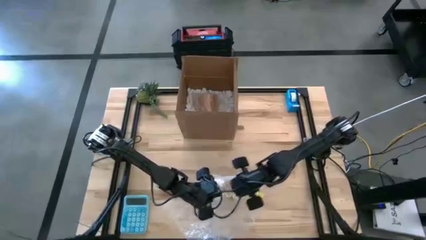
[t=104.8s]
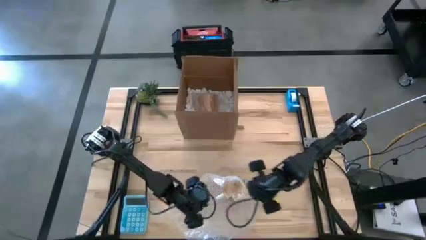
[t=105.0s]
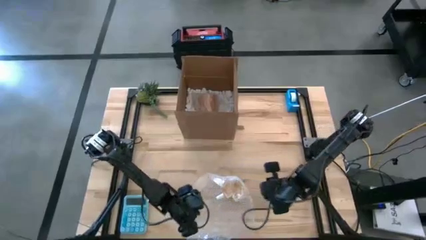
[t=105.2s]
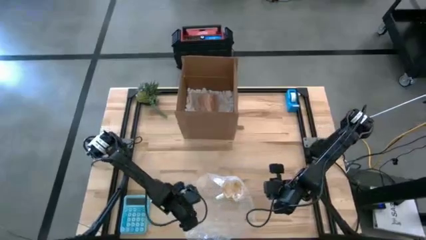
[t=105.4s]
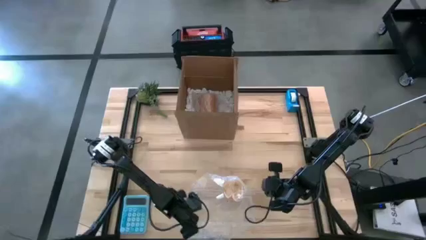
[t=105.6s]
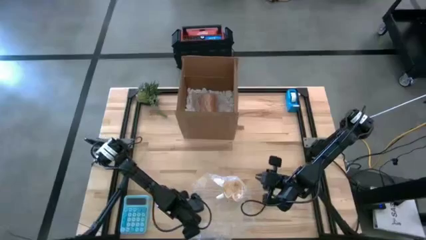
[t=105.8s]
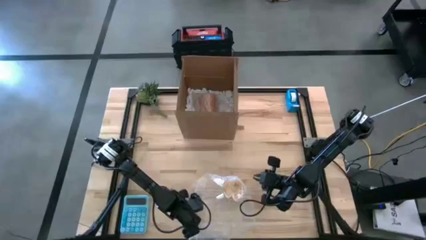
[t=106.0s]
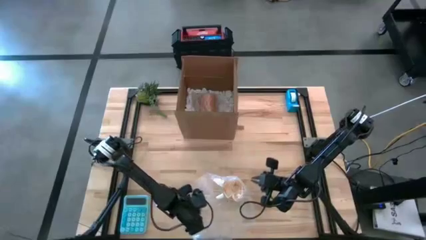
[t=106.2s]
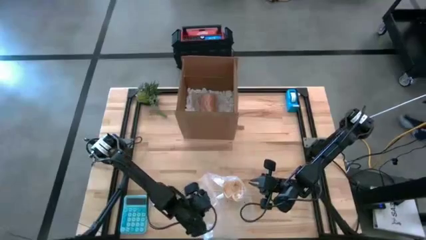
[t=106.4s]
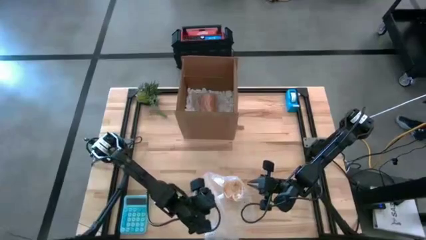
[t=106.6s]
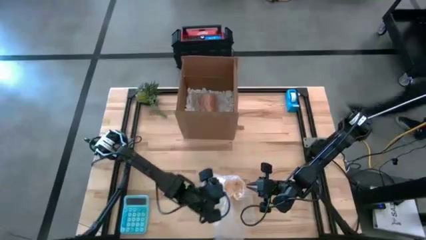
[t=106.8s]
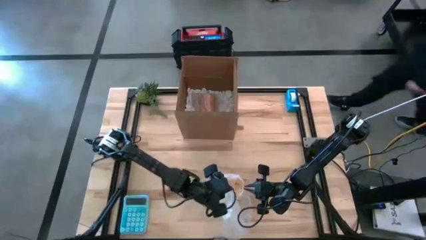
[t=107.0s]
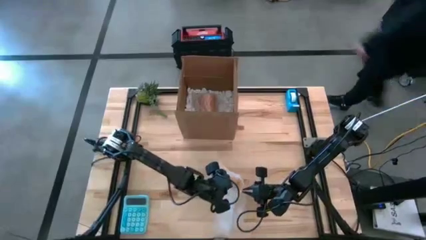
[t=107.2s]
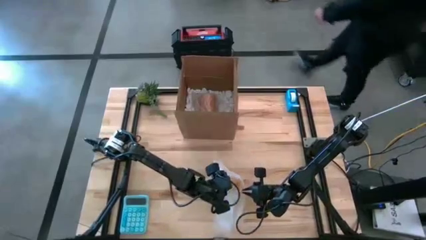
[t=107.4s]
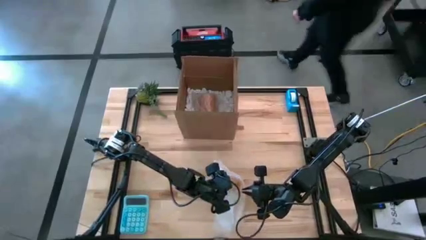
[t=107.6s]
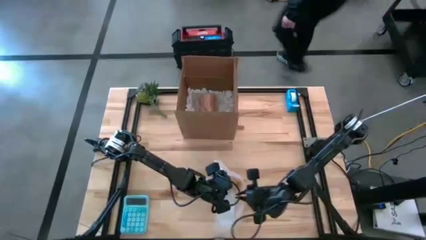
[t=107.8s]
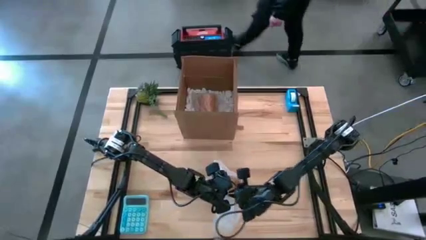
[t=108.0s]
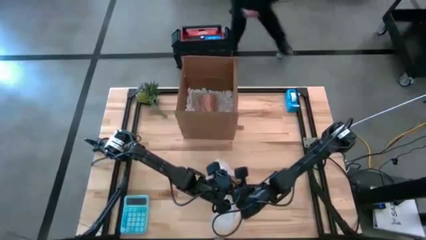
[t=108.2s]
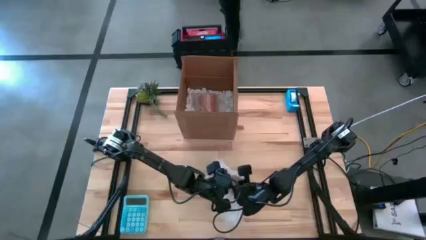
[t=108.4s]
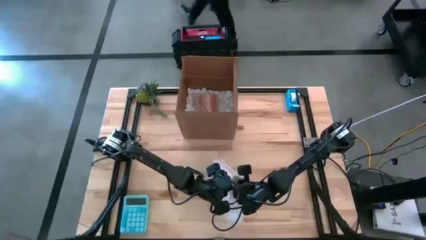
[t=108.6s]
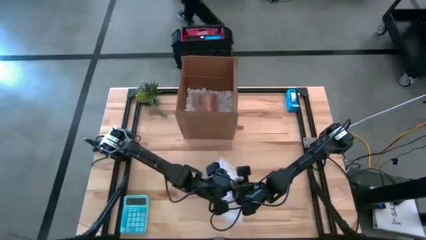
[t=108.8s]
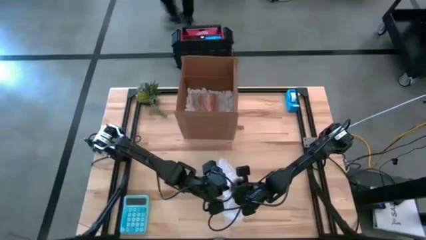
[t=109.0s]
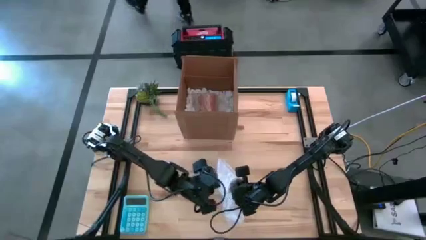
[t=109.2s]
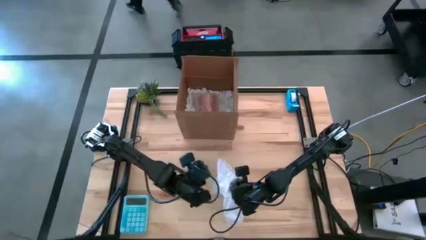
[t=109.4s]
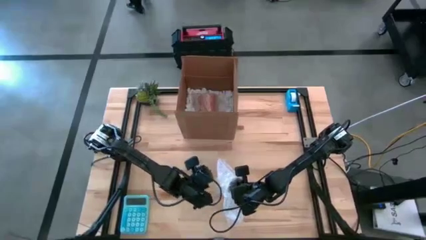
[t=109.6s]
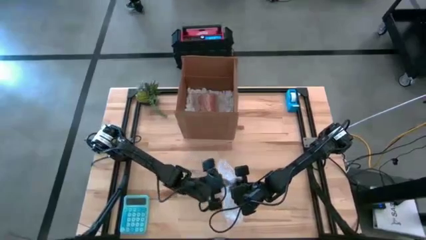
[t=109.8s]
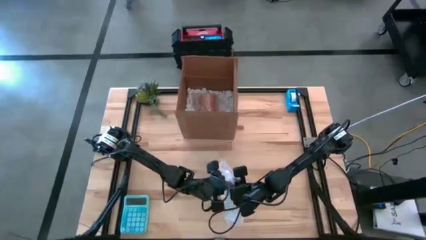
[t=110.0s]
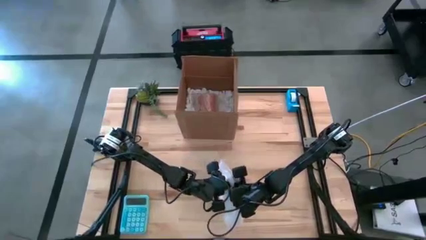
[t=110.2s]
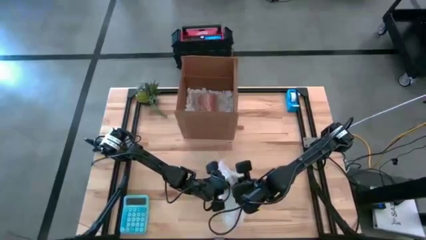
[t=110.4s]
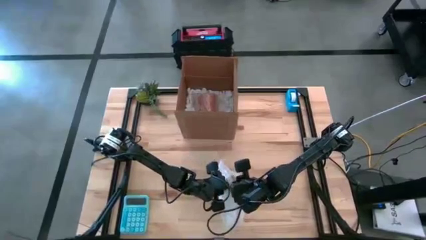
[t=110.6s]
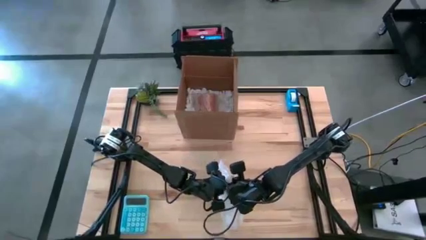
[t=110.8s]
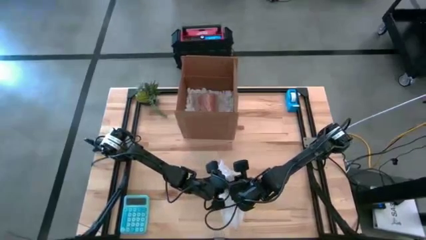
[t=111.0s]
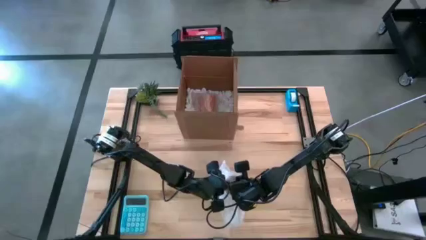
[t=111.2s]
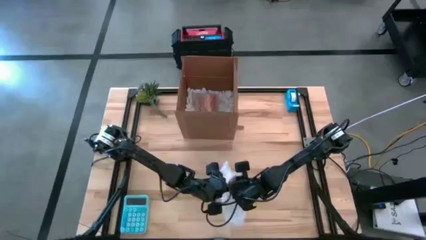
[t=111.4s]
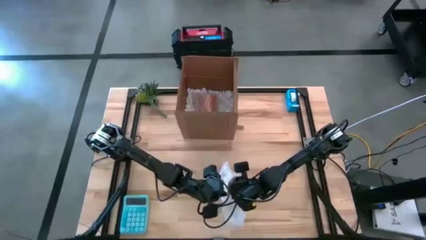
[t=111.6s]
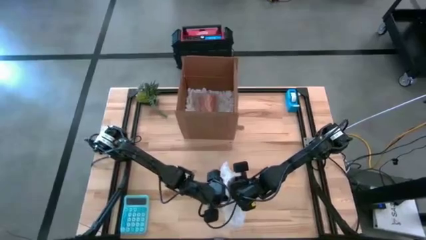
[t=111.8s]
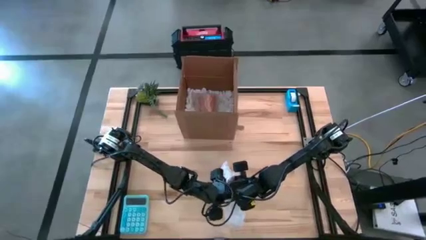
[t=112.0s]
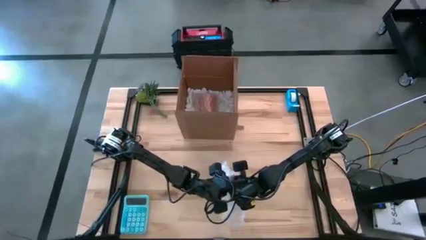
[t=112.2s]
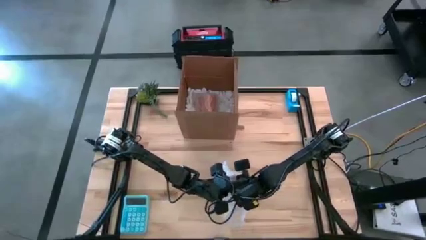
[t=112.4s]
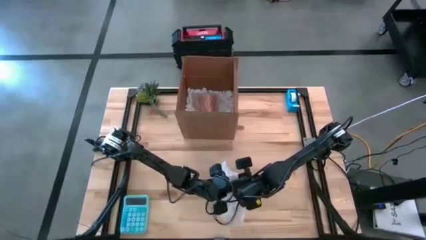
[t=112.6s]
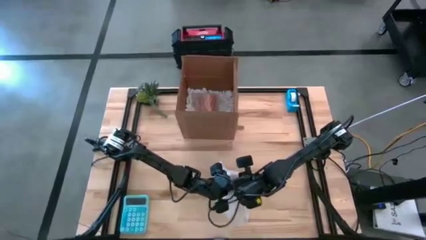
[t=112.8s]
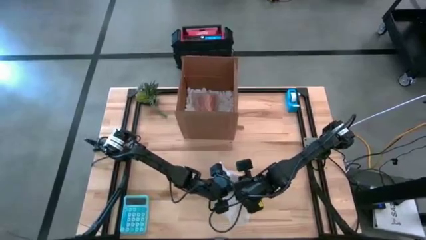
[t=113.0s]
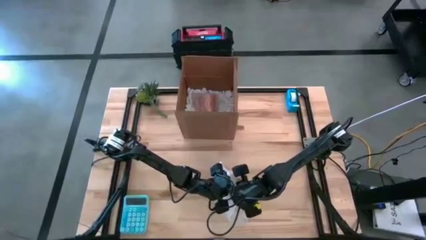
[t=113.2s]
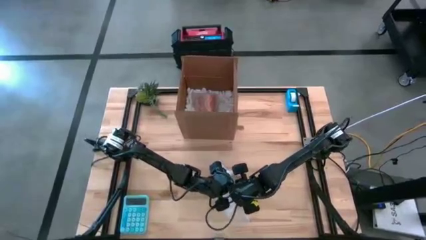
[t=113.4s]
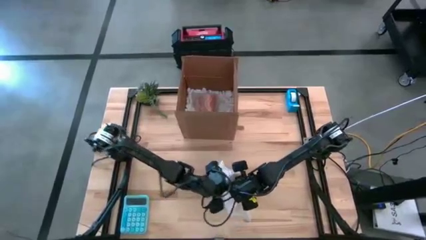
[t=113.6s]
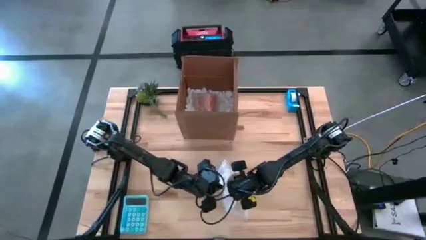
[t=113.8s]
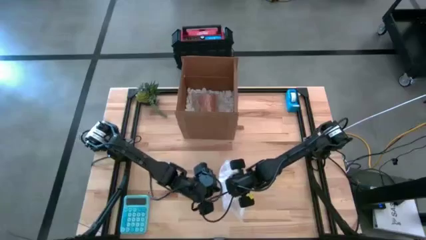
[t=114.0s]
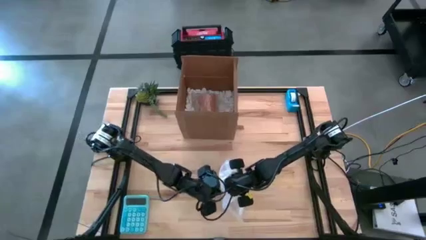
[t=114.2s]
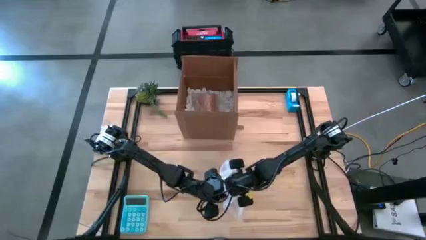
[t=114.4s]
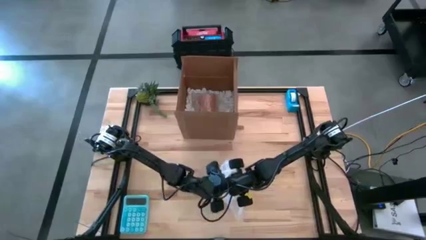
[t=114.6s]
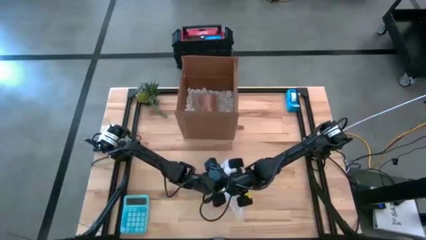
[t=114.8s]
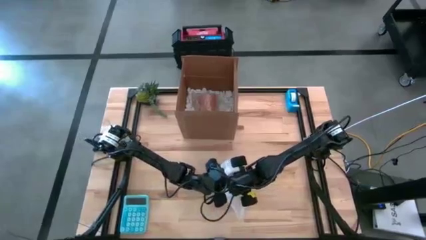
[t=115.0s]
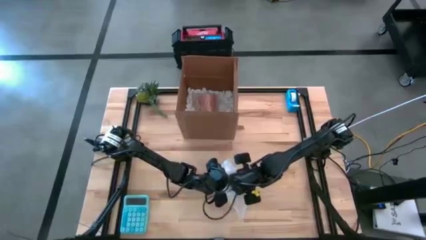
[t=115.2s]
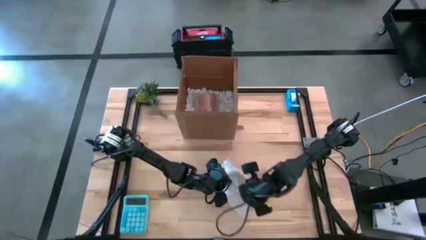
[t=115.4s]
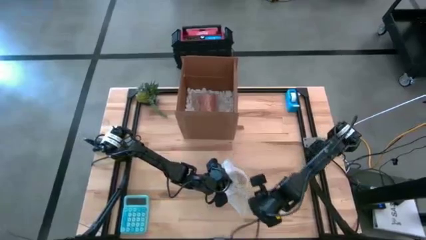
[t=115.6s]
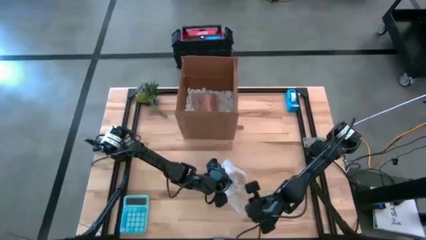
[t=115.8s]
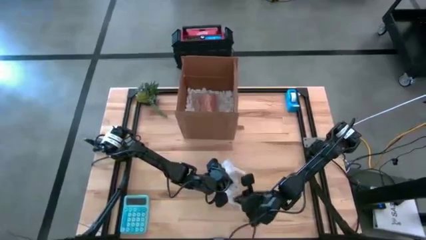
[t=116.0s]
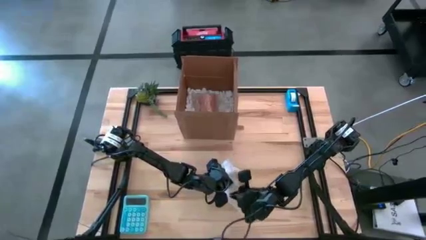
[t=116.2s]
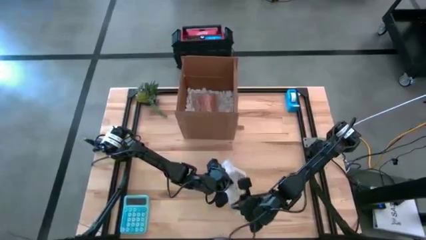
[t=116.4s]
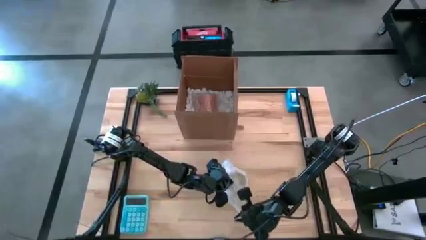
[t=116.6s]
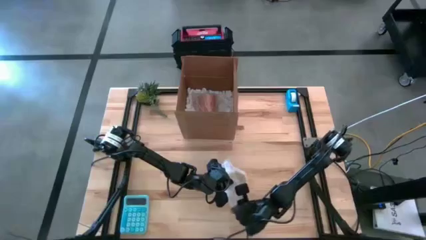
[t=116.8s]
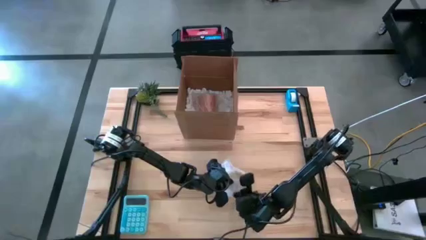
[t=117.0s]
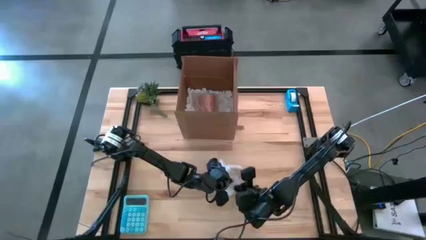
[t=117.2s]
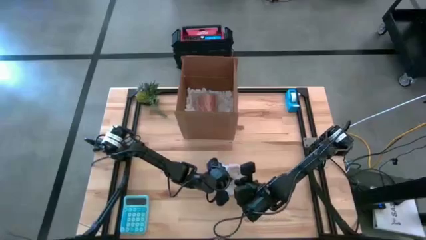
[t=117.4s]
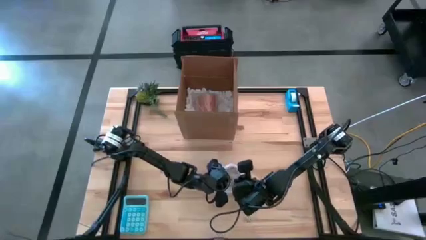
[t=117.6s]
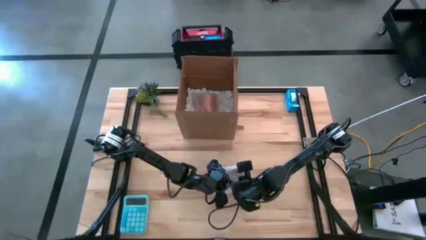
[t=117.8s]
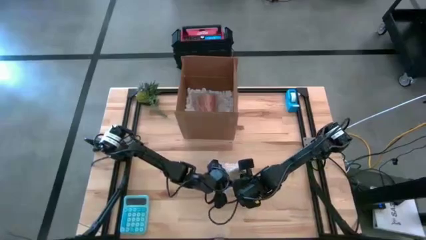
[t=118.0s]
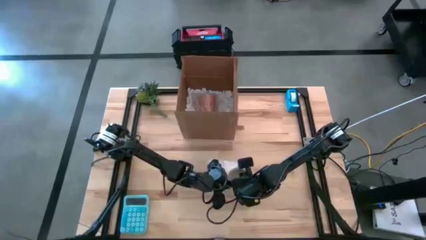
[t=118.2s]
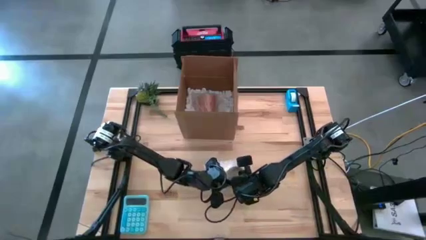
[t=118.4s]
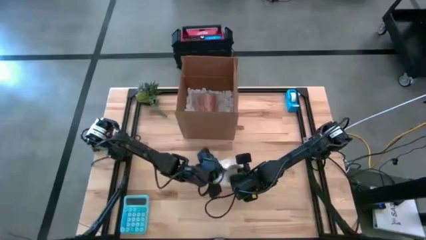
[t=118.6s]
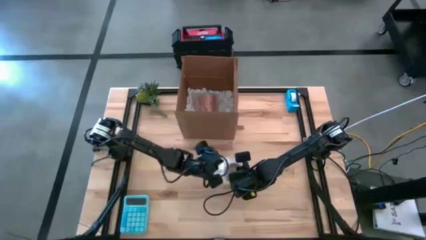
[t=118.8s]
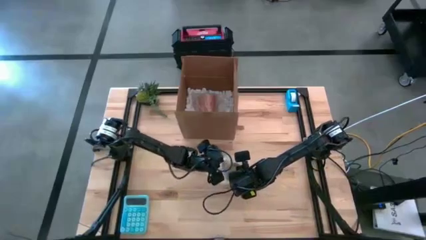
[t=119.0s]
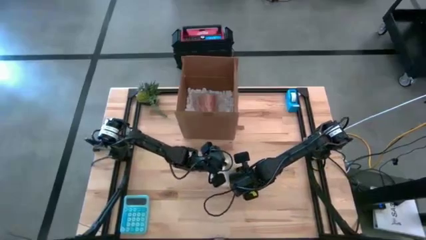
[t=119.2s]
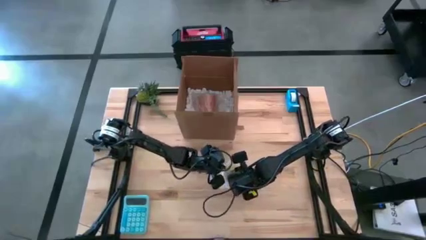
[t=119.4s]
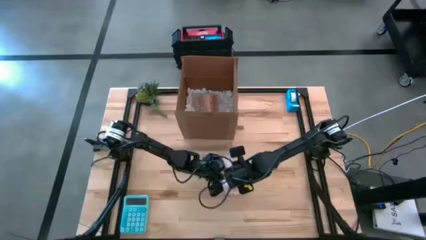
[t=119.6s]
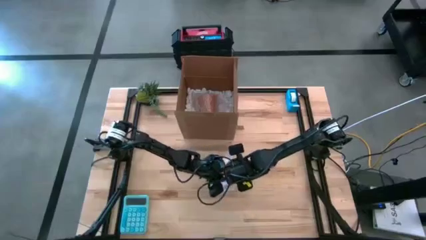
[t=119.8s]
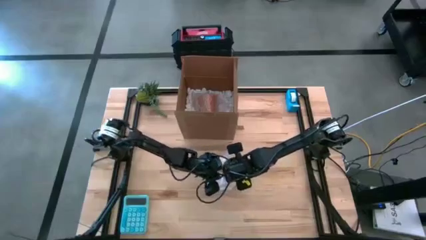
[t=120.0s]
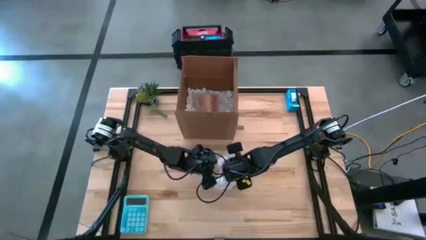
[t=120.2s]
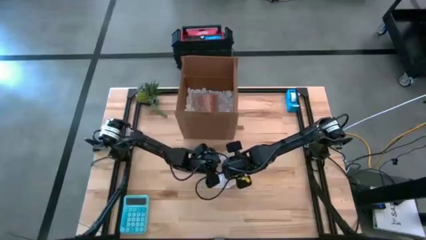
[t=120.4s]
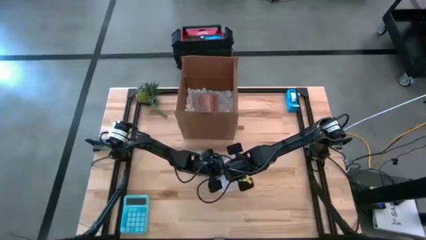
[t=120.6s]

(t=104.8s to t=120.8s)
Task: wrap mug
Wrap the yellow mug with bubble wrap
